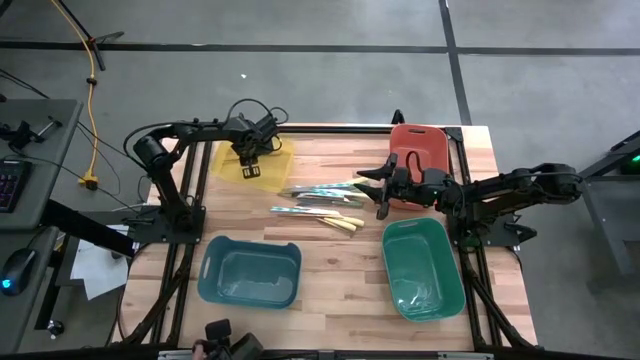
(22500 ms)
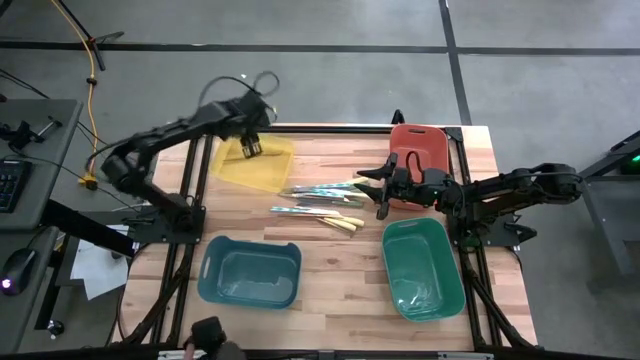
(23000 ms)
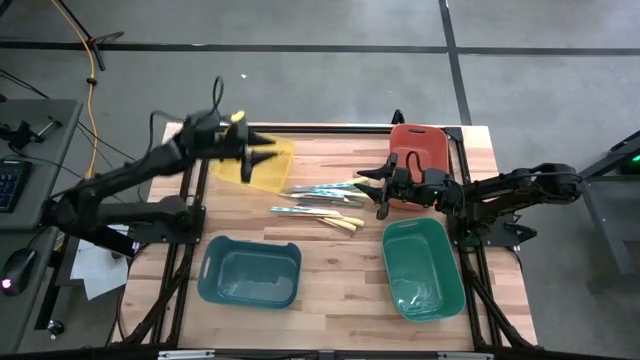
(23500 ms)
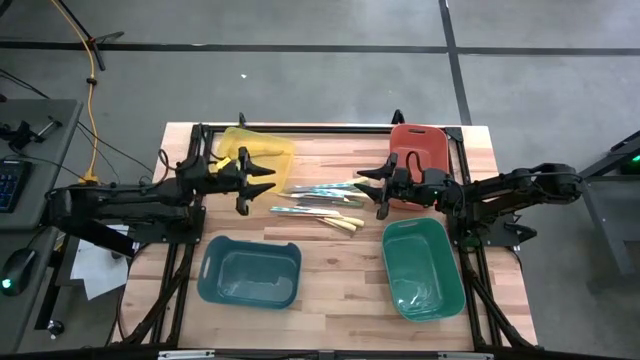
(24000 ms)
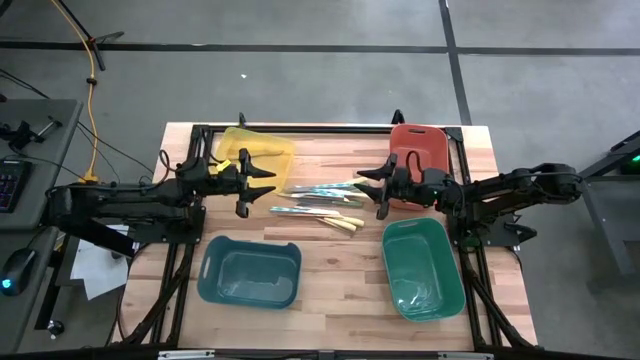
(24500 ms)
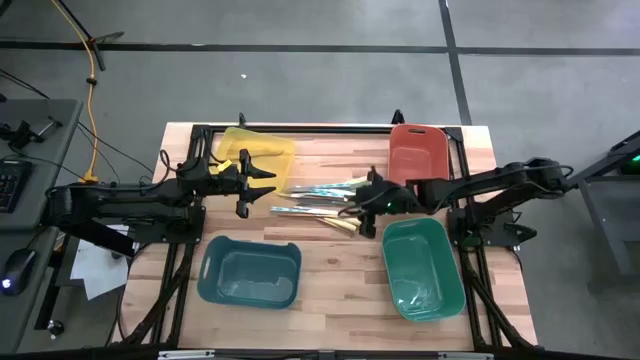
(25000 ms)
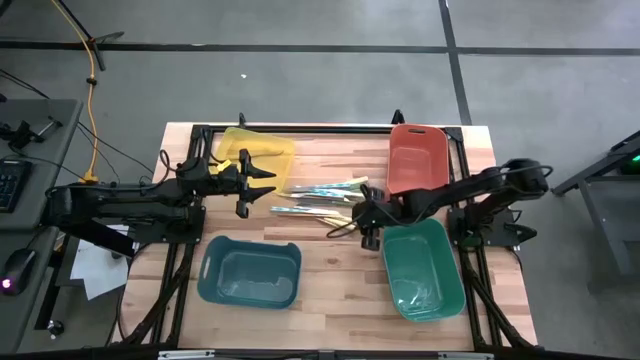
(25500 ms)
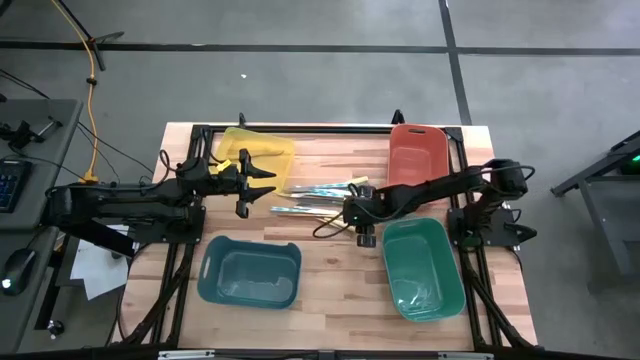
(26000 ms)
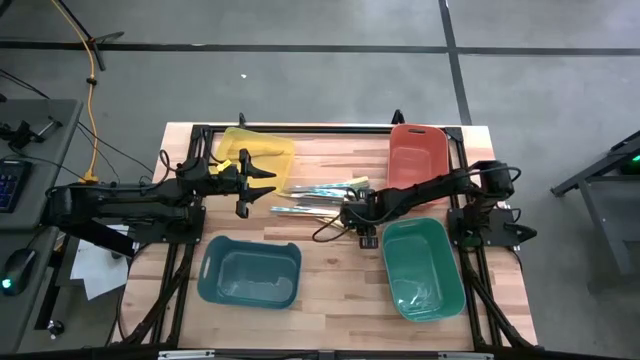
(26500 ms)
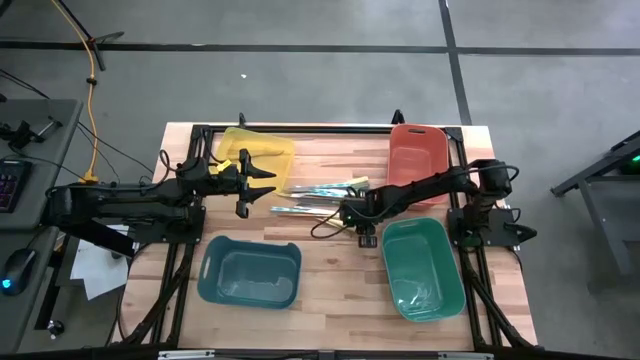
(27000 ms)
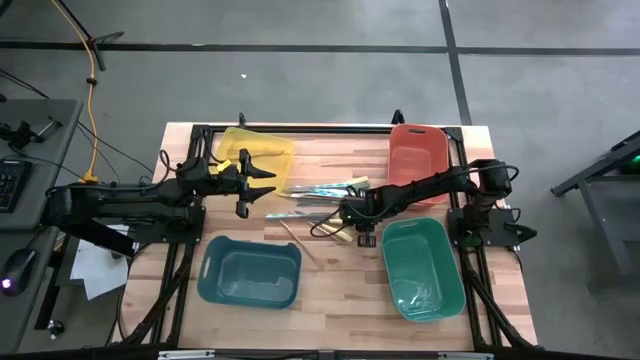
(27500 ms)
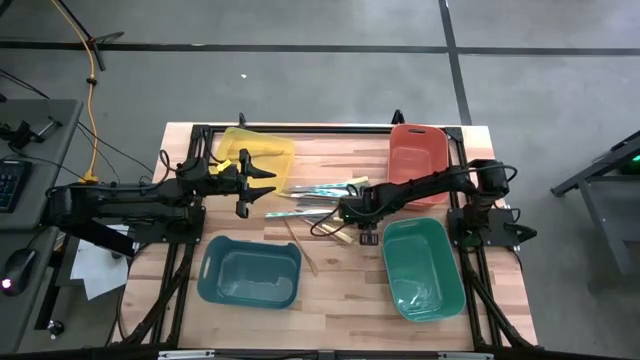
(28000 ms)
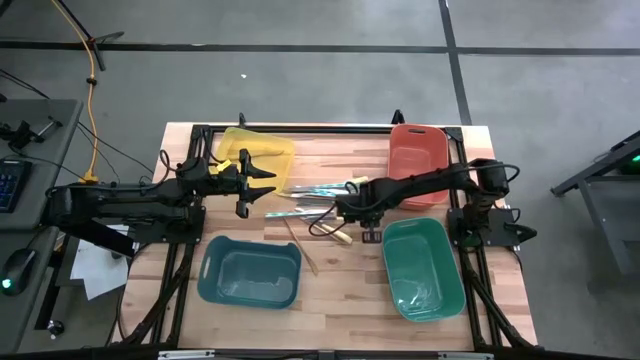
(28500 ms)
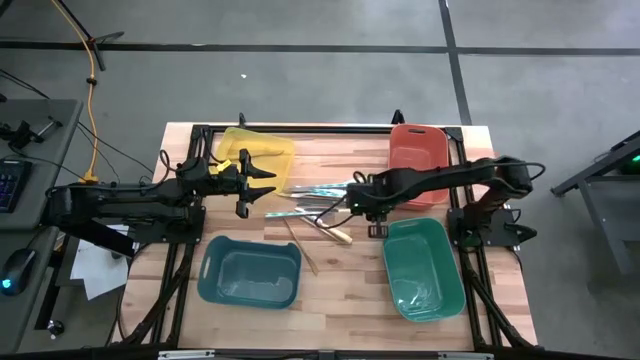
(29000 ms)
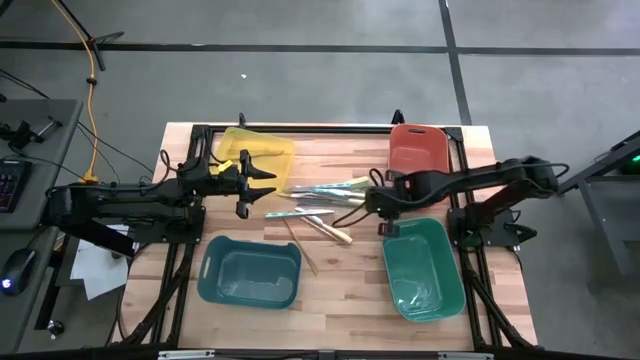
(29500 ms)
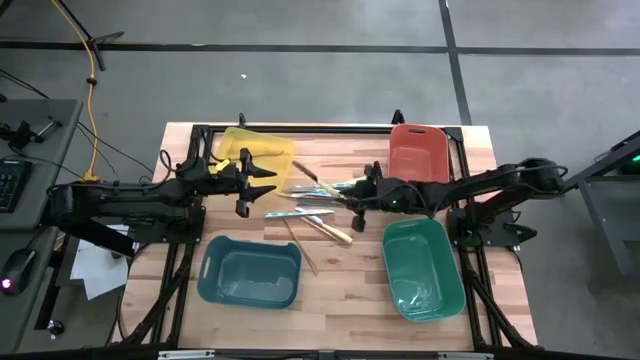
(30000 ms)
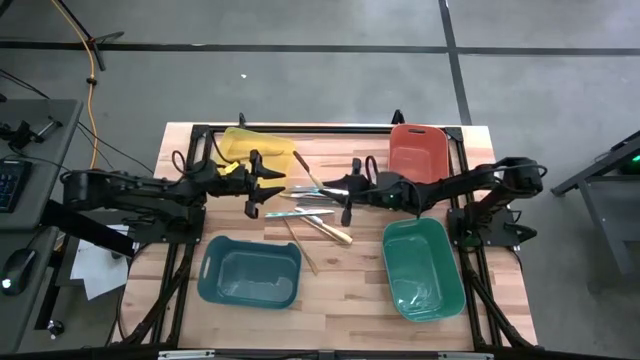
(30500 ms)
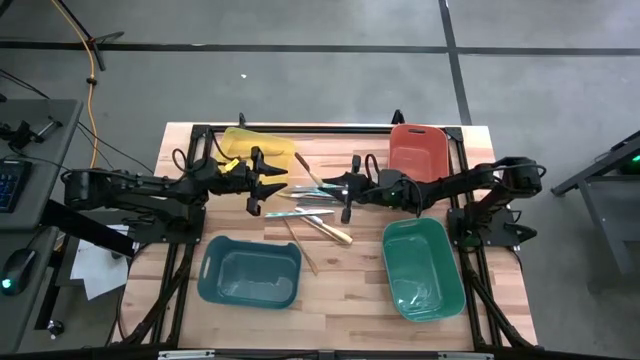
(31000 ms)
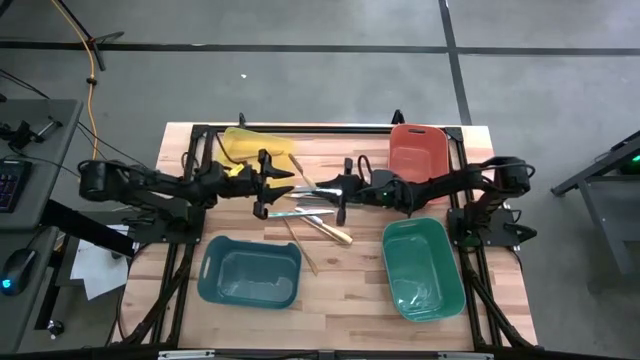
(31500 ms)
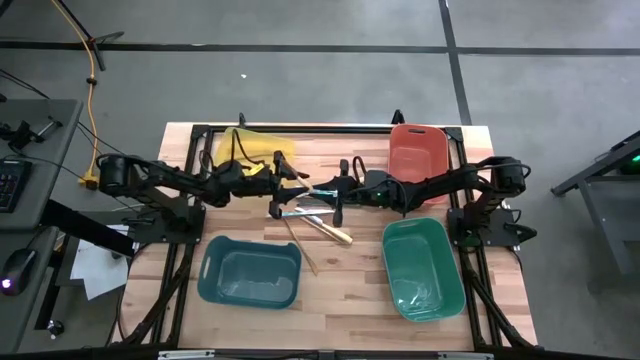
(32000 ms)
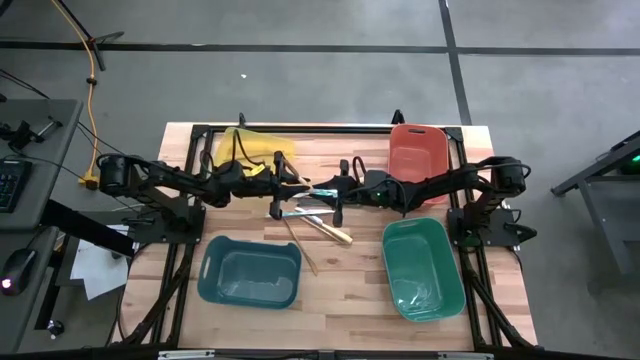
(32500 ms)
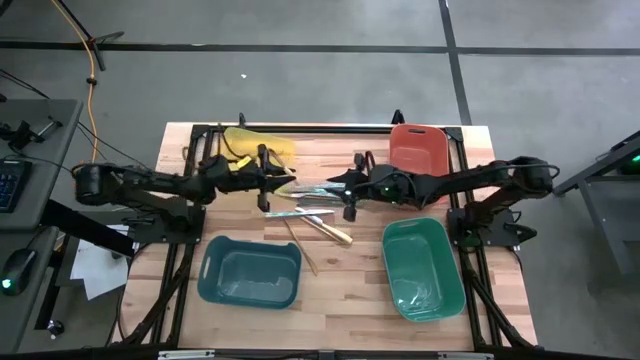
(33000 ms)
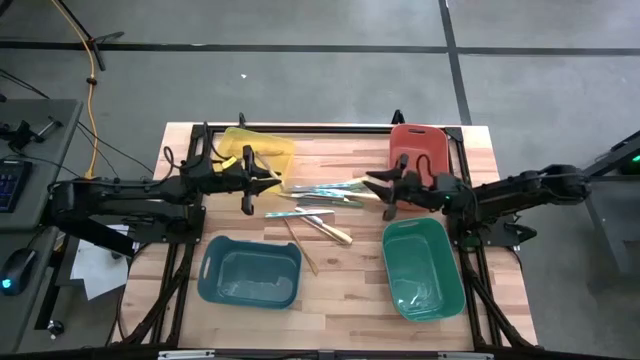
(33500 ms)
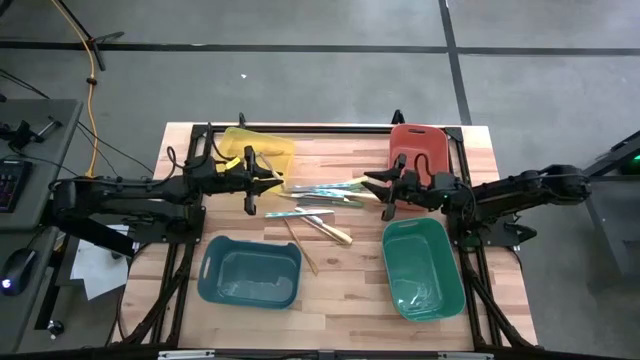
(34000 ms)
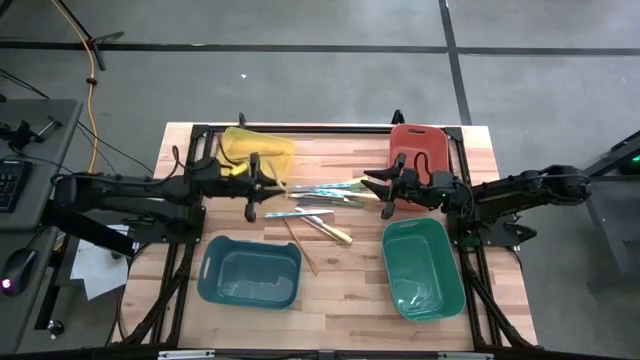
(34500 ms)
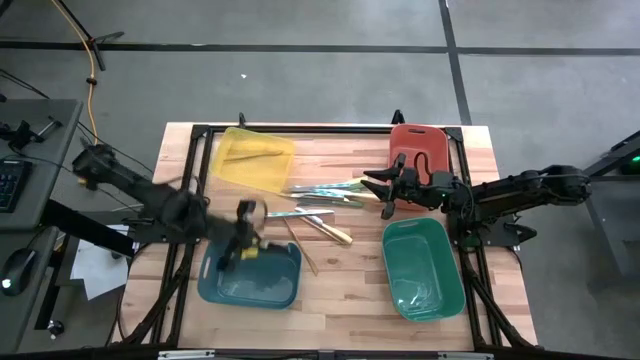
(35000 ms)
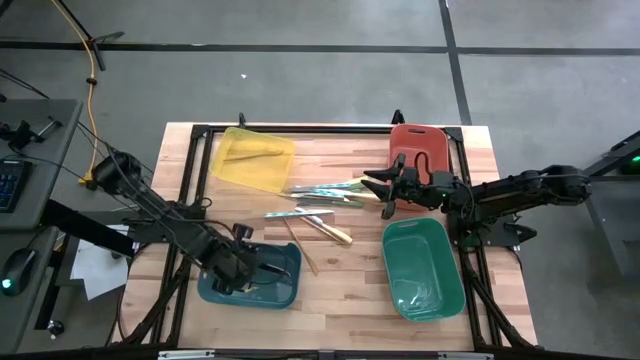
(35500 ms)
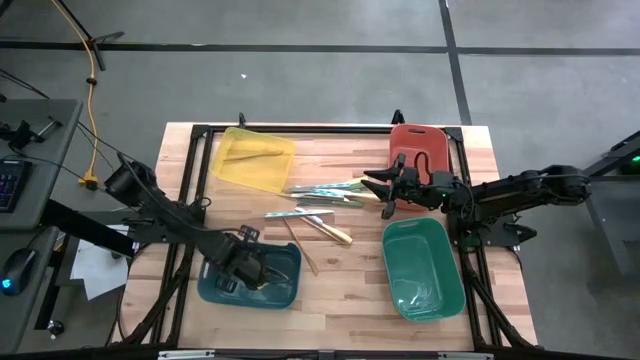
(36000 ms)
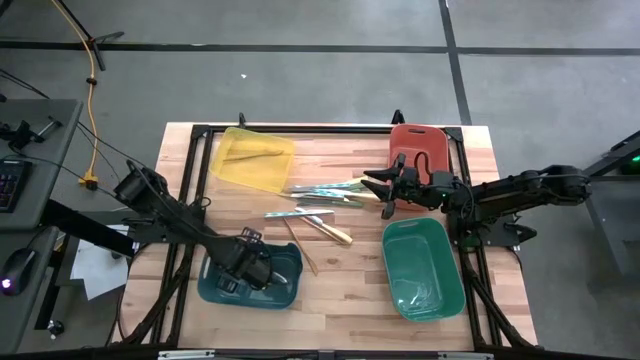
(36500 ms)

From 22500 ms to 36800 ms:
Task: Sort silverware by color (type)
Put the yellow knife into the blue bin

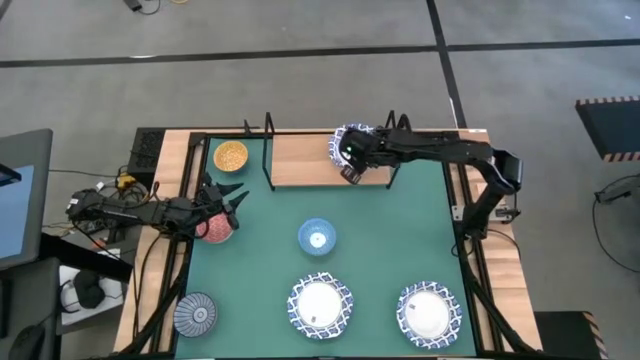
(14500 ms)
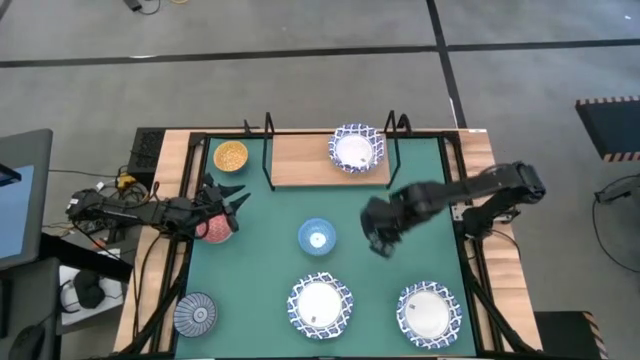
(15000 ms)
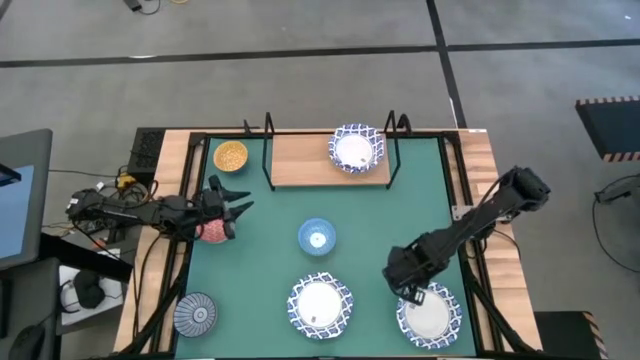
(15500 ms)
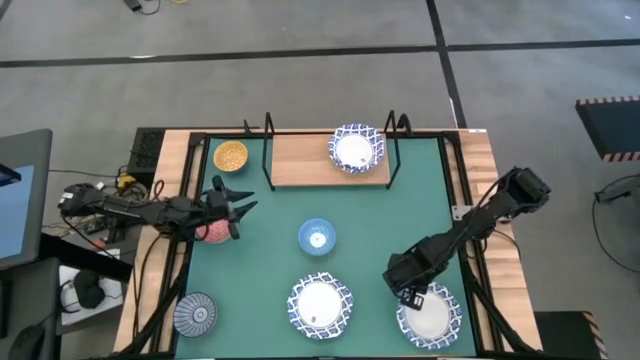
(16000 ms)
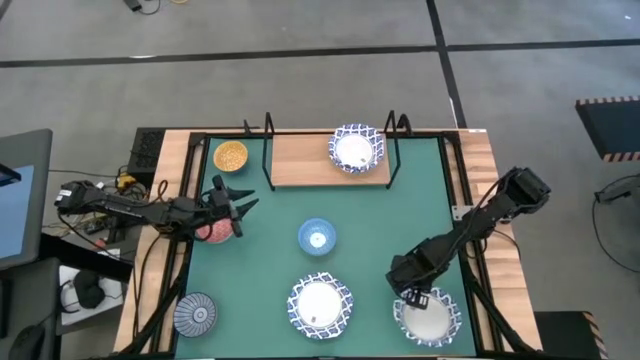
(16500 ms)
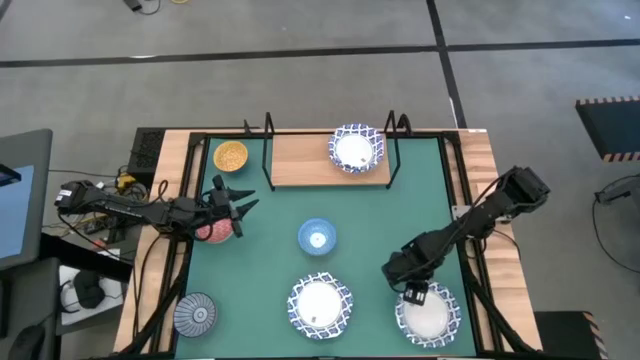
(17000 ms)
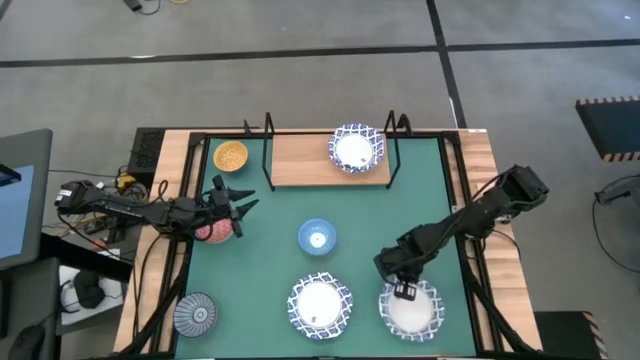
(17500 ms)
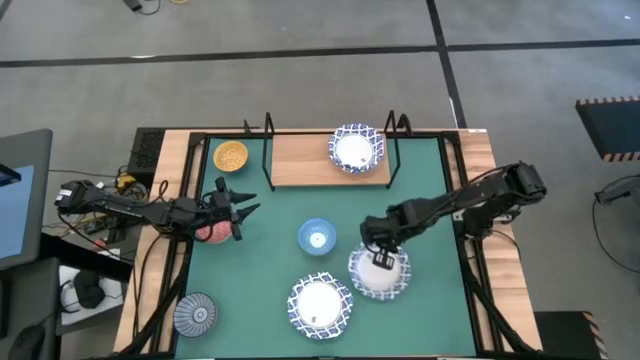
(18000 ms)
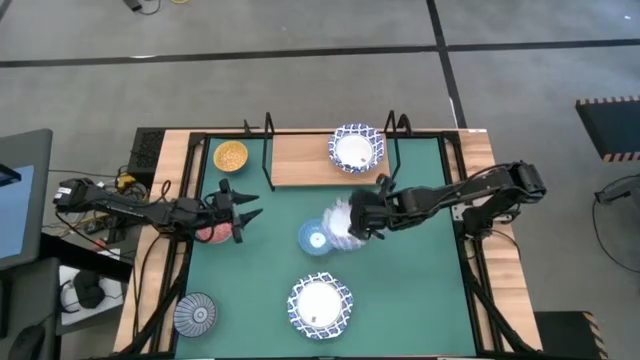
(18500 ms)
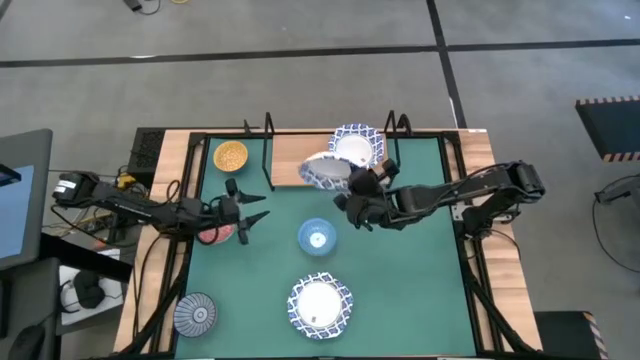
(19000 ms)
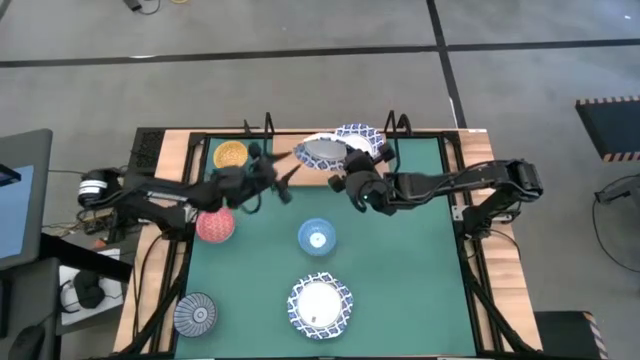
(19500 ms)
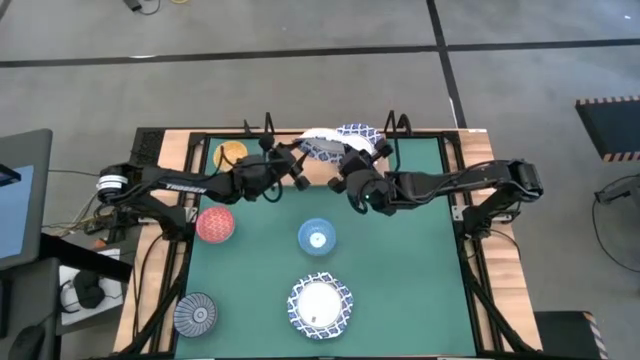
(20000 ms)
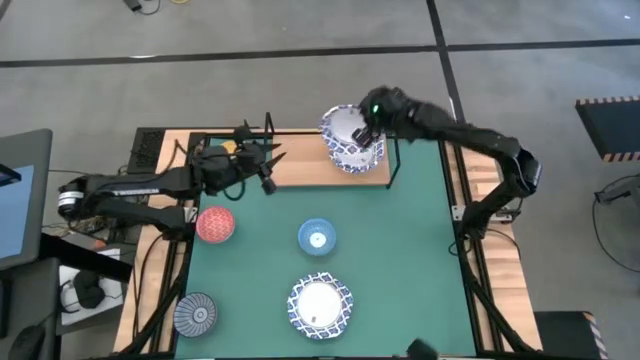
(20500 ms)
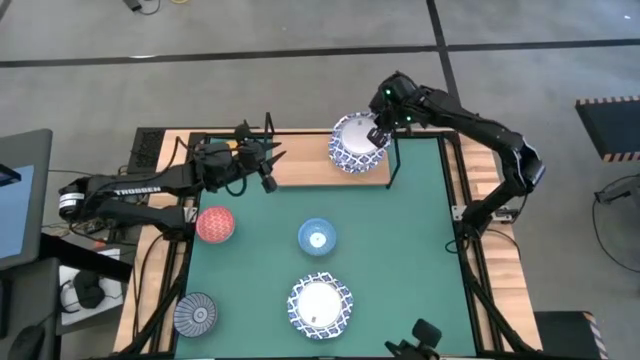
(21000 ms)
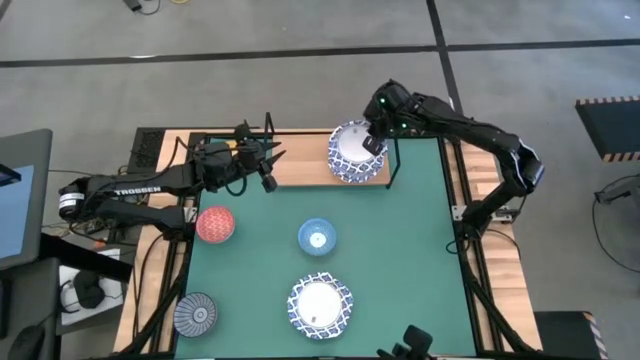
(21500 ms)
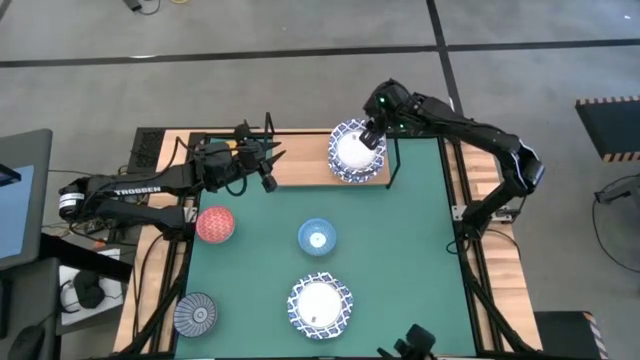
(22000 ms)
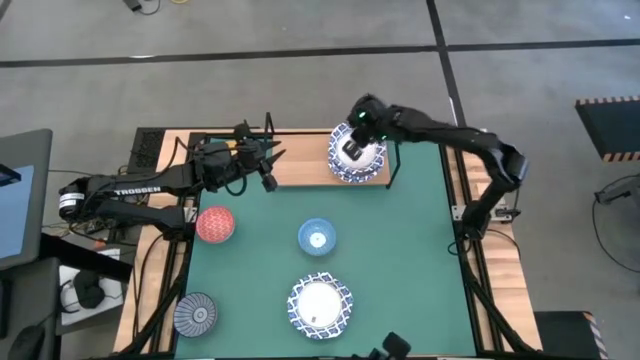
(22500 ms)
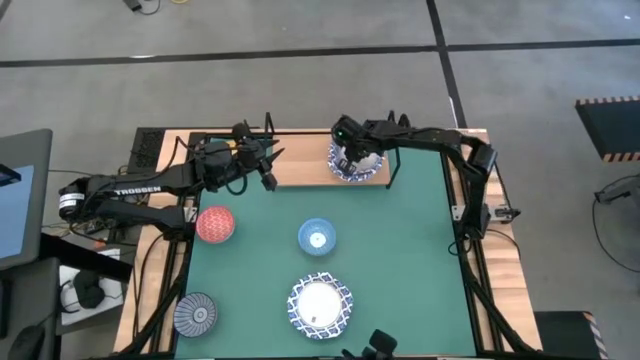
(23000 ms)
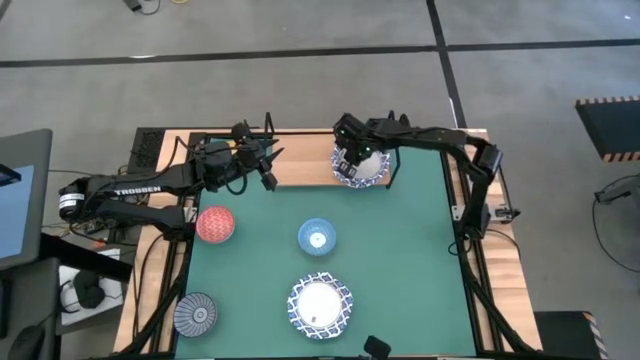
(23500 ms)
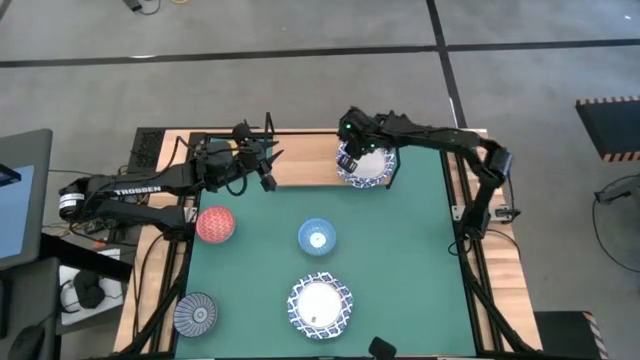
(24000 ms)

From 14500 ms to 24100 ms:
Task: Place and stack bowls onto a shelf
Stack the white patterned bowl on top of the white patterned bowl on the shelf
